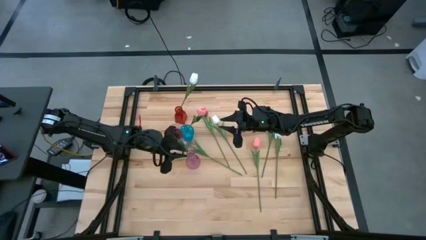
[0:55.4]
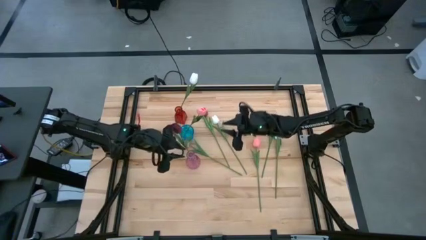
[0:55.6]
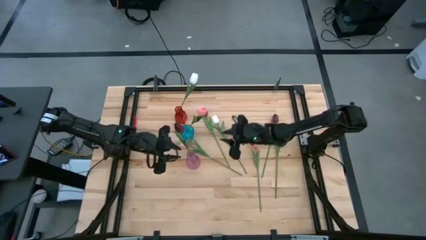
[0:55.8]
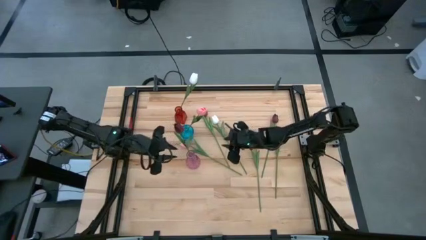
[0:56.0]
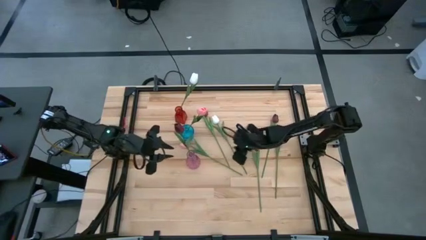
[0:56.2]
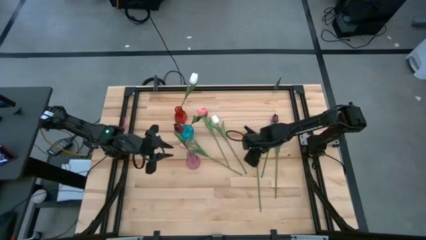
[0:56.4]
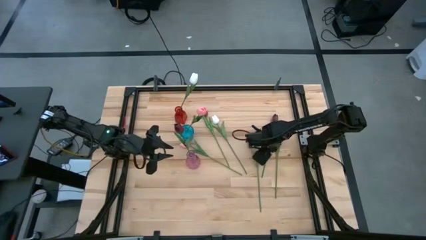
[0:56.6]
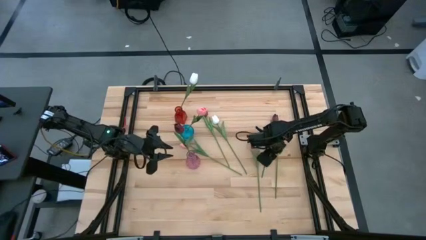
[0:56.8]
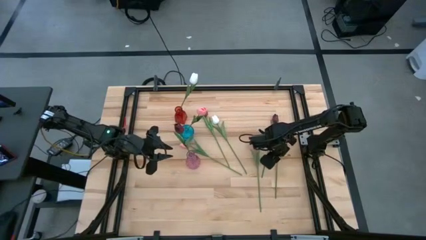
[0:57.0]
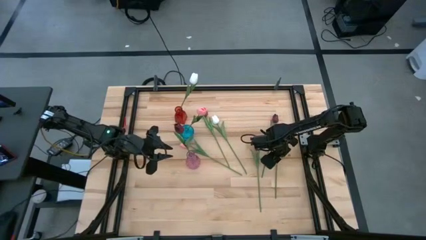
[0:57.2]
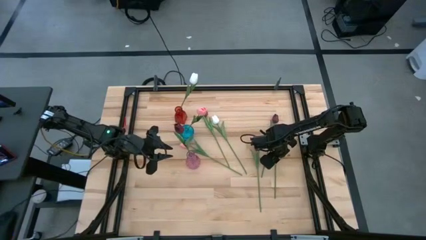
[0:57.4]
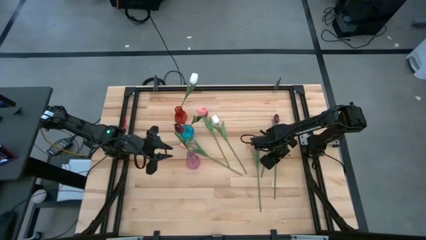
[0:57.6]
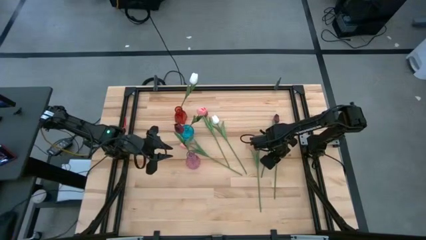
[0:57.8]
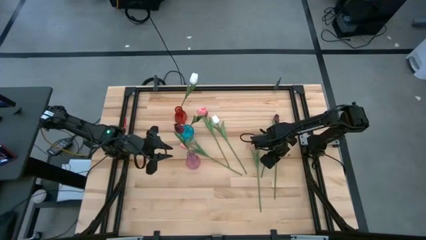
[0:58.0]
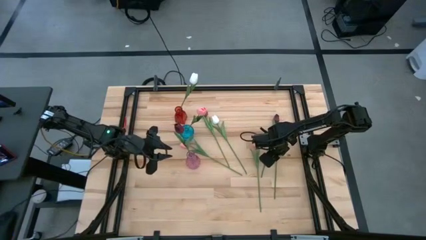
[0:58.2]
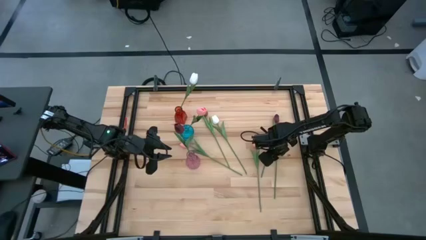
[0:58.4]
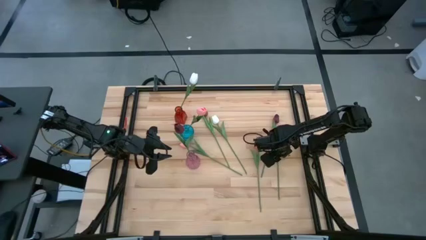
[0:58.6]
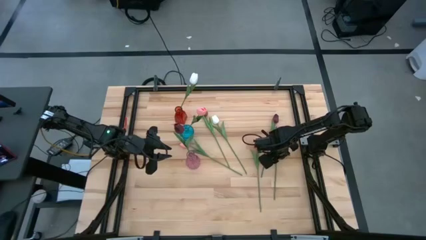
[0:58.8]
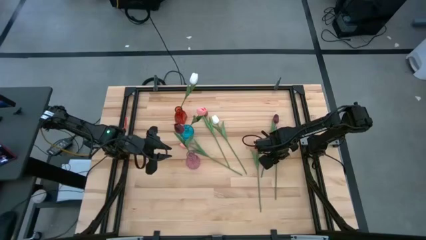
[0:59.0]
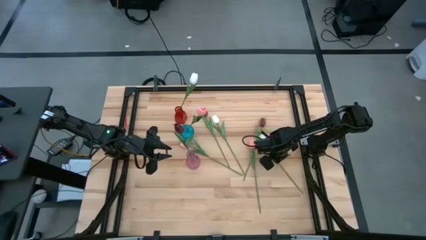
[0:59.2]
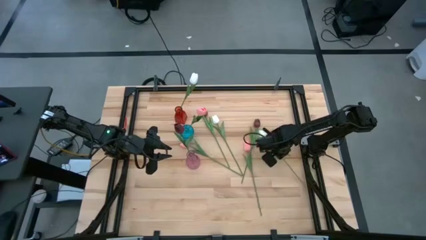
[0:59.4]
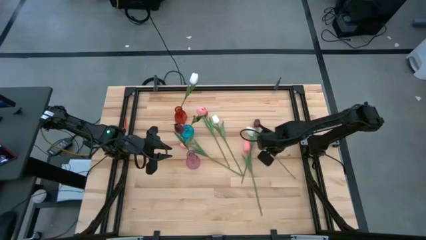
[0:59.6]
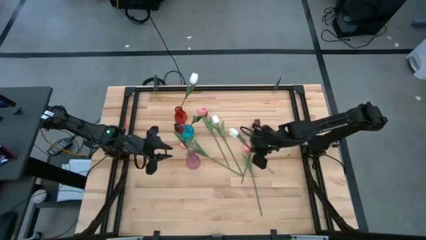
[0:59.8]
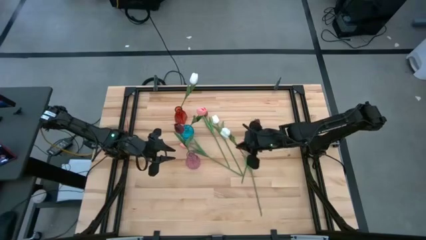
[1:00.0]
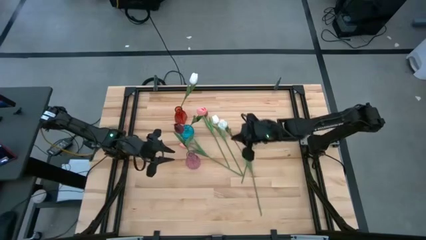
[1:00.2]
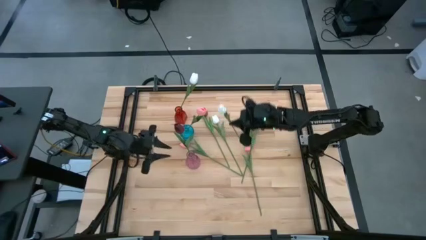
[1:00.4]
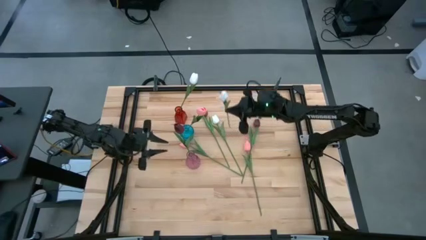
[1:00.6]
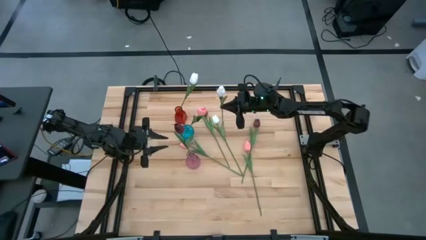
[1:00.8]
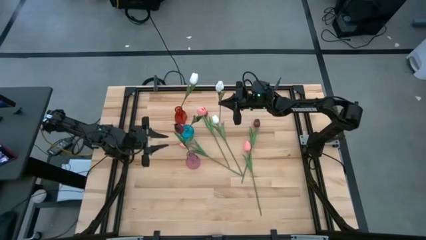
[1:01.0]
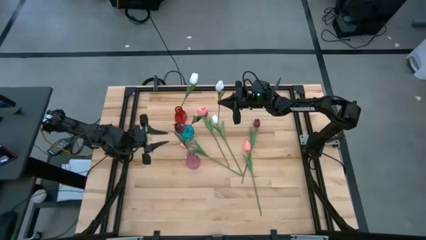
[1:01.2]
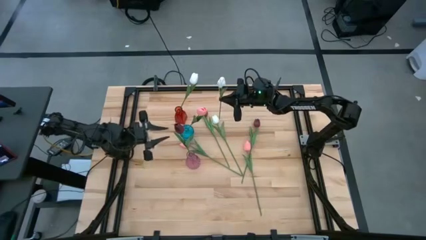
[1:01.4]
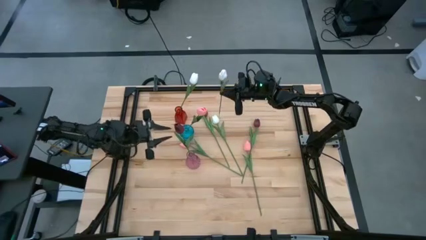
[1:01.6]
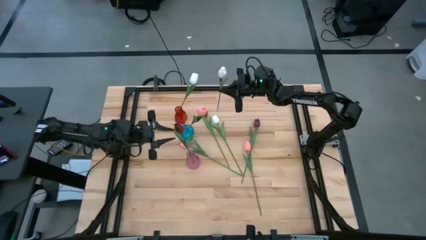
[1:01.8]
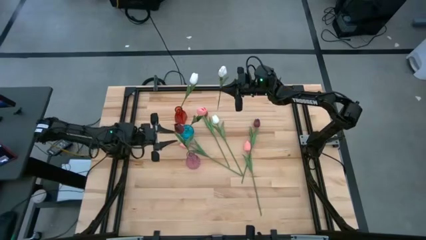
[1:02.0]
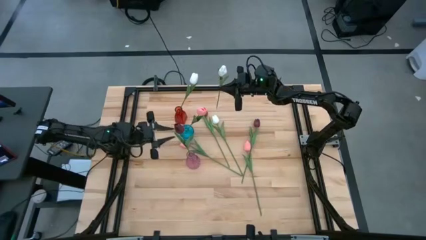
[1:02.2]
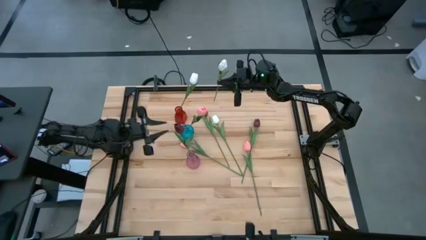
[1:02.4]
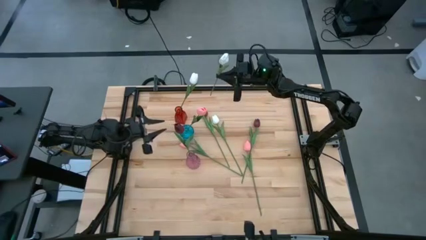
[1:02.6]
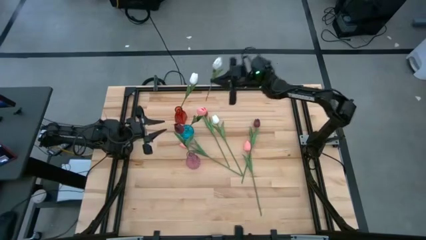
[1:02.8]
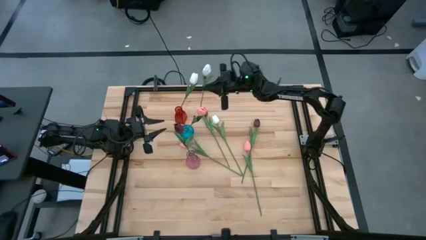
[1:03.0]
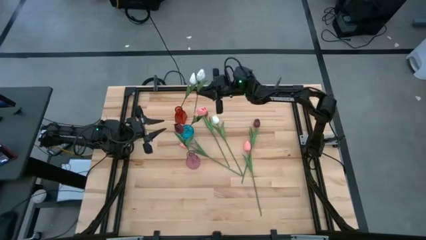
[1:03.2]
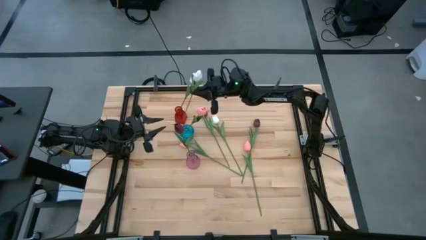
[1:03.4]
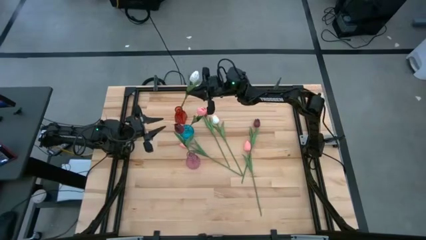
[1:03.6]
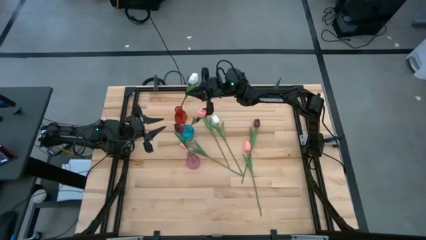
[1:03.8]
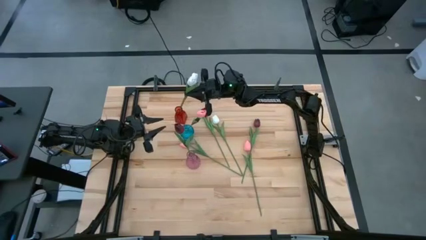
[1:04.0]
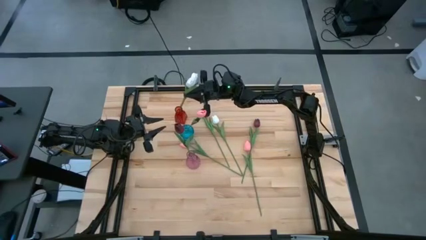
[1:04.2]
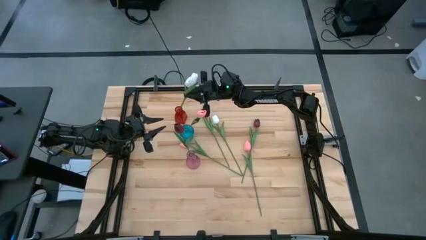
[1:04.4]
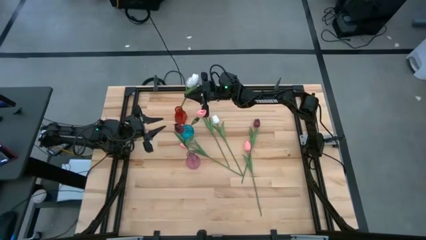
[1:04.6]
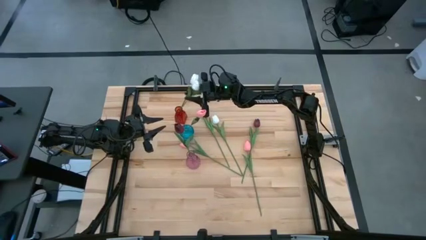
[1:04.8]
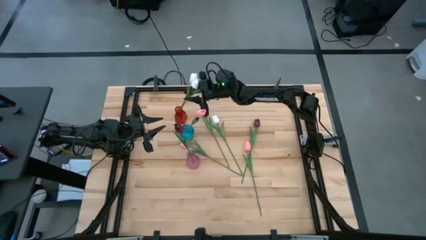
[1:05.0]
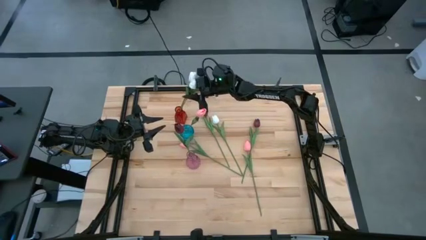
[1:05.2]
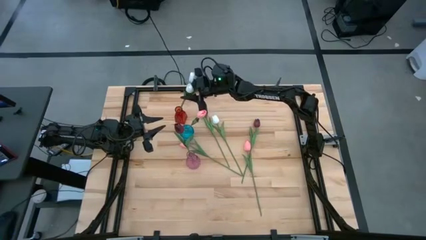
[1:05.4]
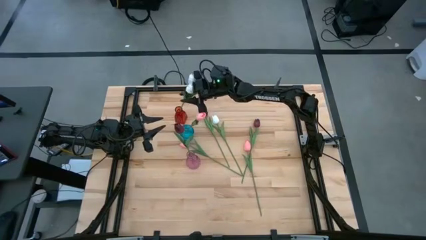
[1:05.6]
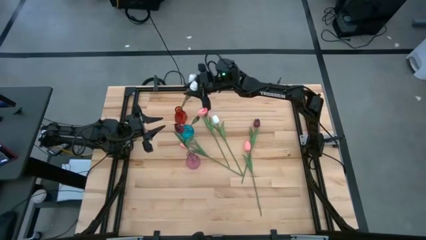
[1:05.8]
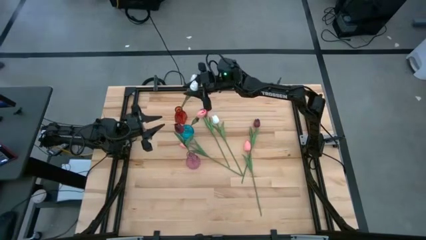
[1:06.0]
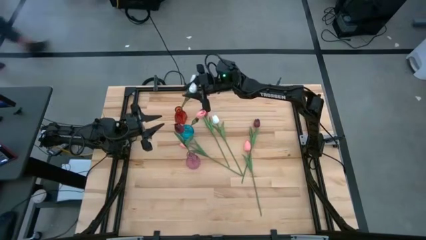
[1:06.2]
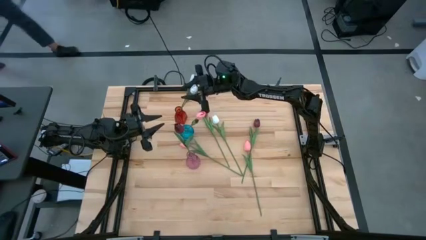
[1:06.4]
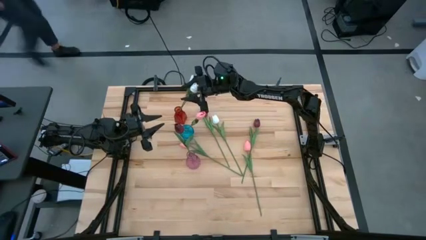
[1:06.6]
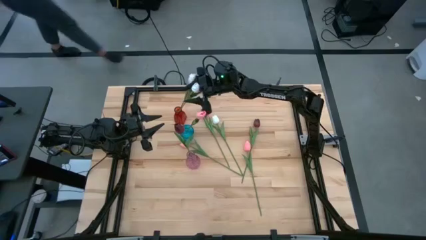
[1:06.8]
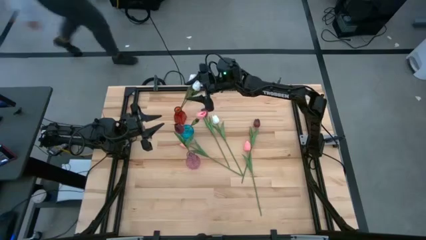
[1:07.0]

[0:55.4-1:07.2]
Task: Sort flowers into vase by color
Put the right white flower into the red vase
